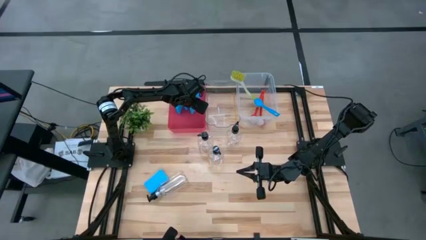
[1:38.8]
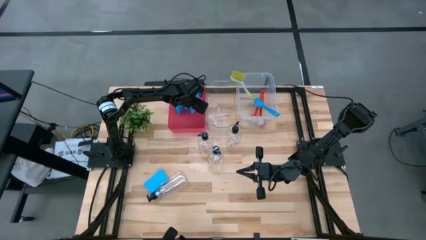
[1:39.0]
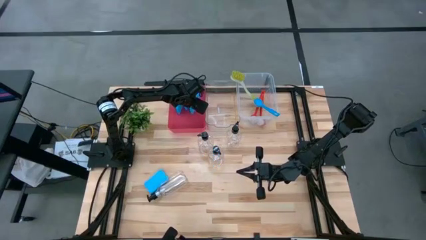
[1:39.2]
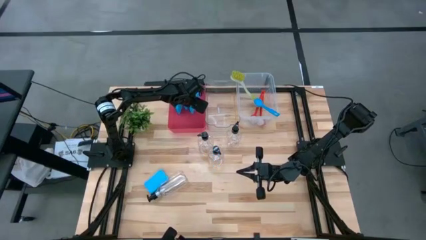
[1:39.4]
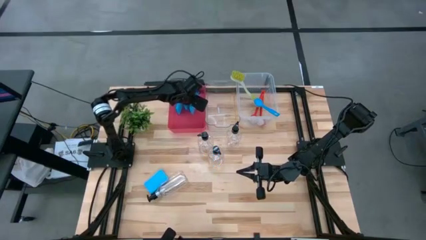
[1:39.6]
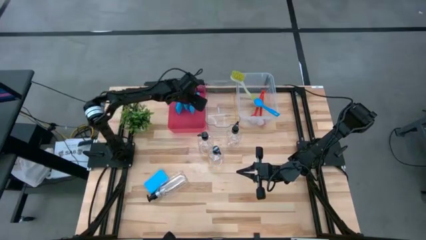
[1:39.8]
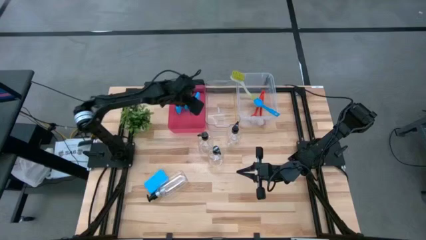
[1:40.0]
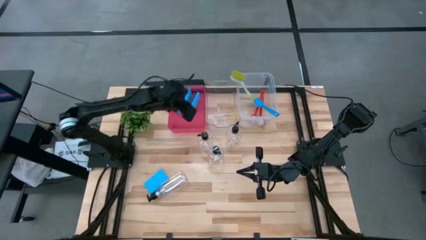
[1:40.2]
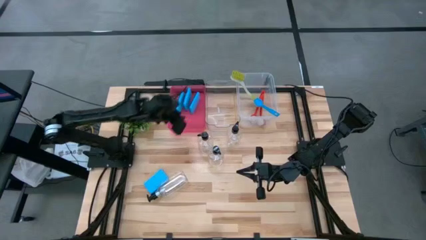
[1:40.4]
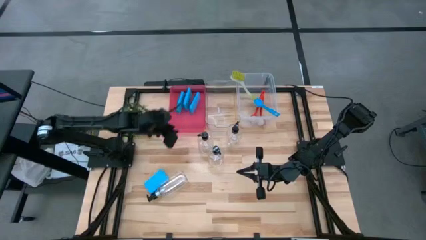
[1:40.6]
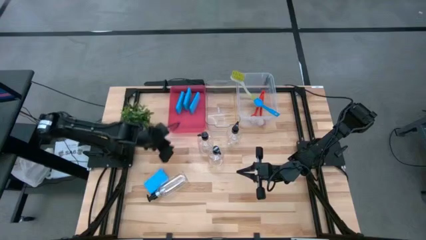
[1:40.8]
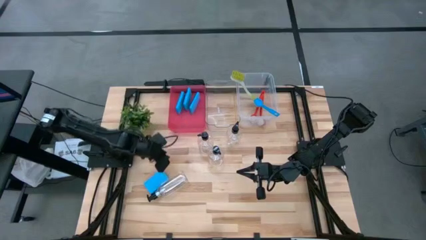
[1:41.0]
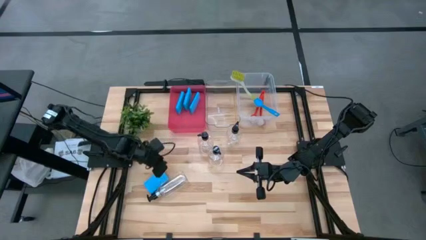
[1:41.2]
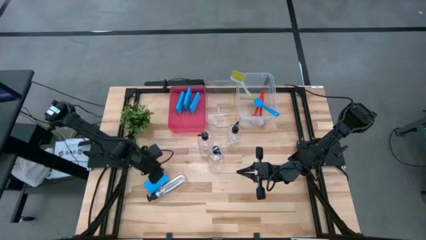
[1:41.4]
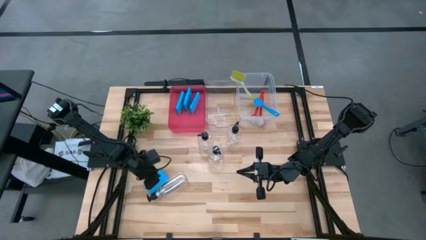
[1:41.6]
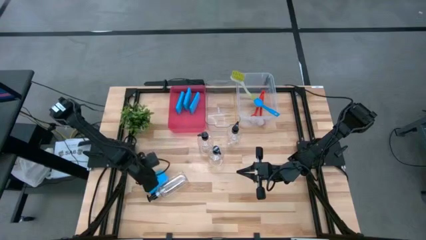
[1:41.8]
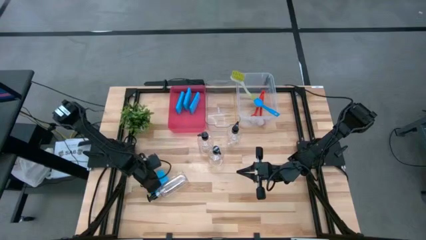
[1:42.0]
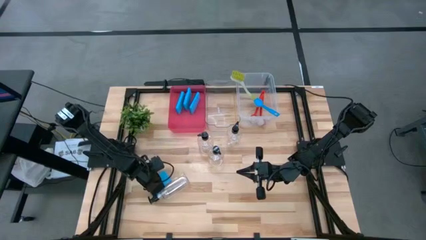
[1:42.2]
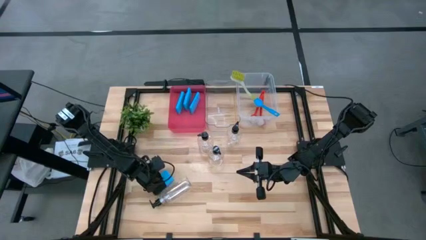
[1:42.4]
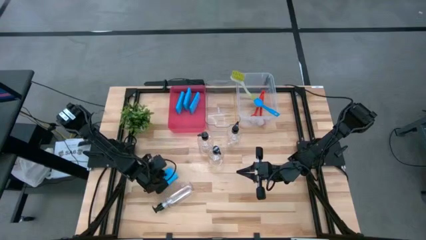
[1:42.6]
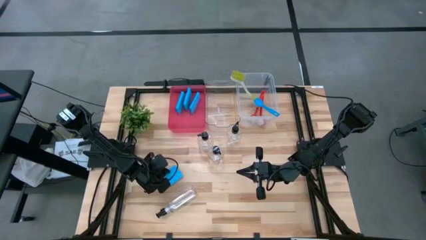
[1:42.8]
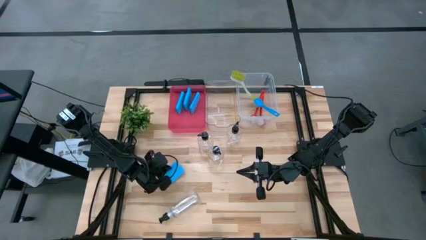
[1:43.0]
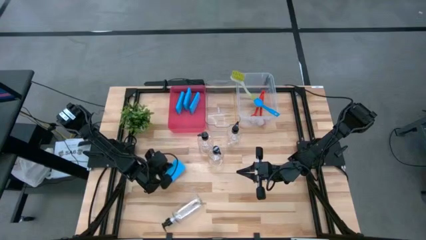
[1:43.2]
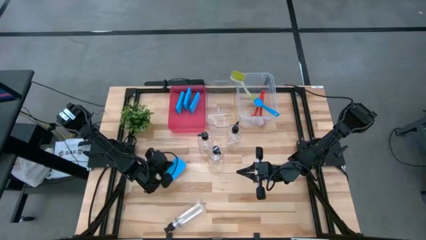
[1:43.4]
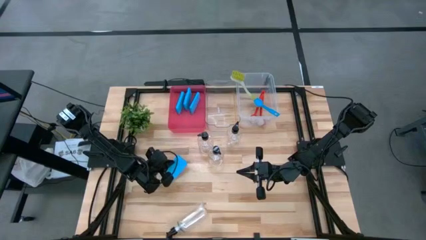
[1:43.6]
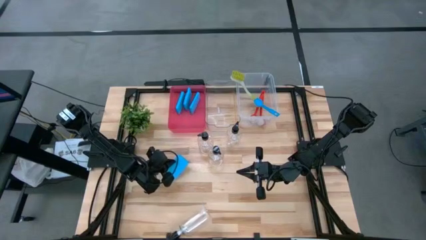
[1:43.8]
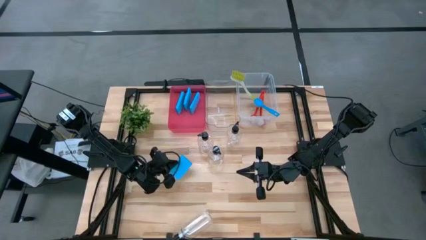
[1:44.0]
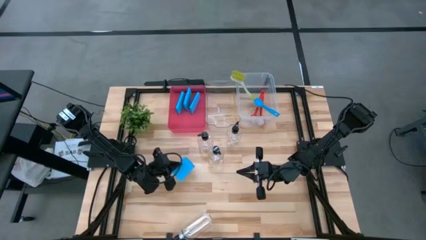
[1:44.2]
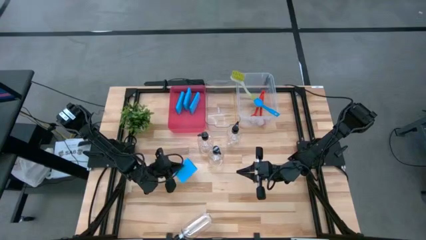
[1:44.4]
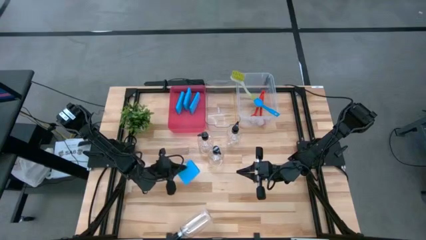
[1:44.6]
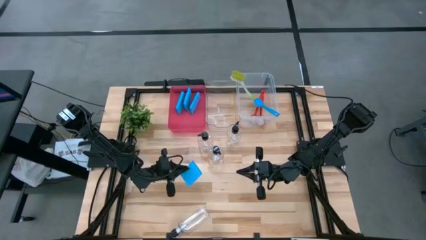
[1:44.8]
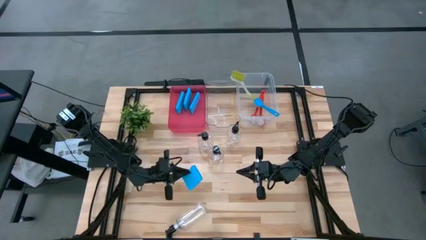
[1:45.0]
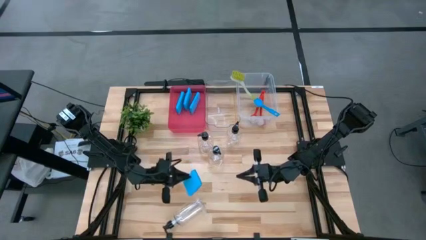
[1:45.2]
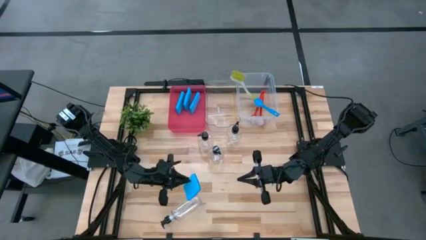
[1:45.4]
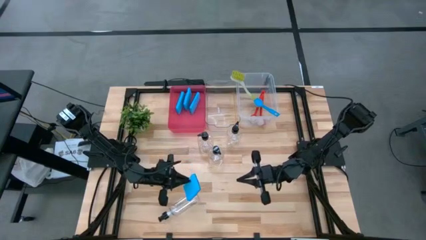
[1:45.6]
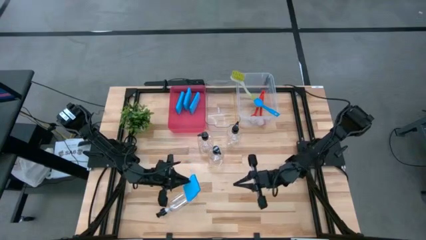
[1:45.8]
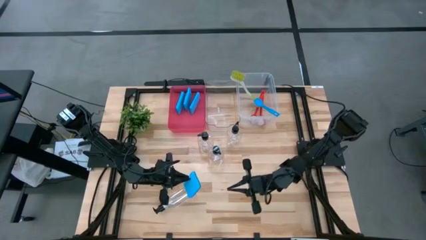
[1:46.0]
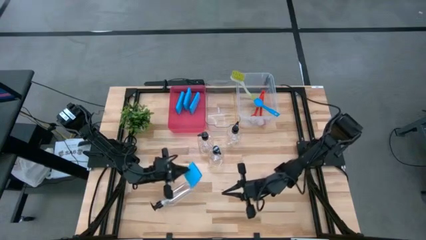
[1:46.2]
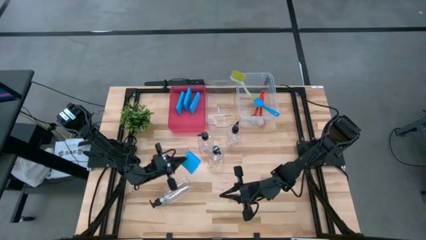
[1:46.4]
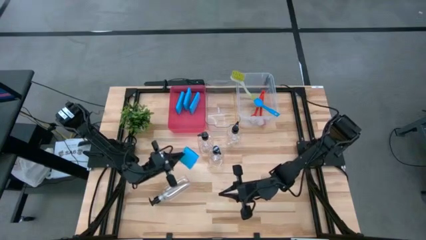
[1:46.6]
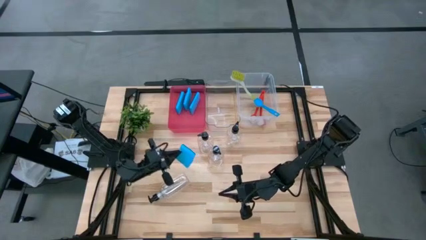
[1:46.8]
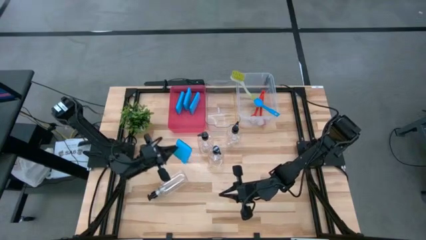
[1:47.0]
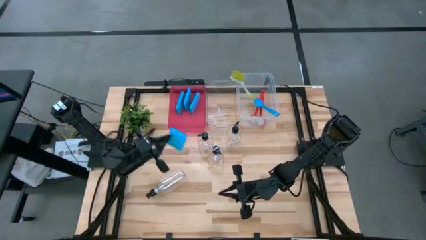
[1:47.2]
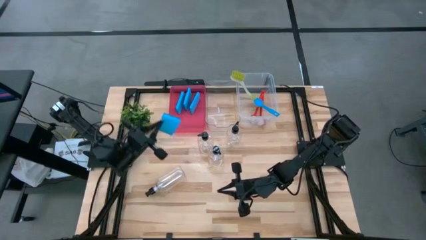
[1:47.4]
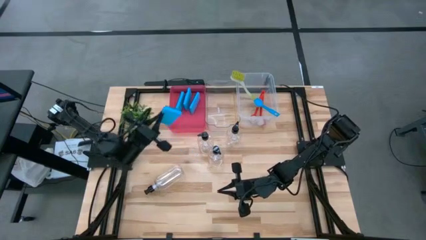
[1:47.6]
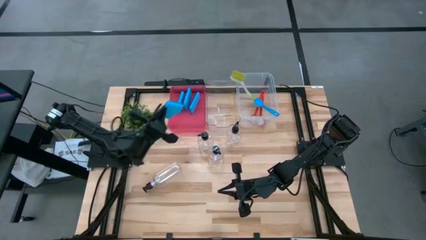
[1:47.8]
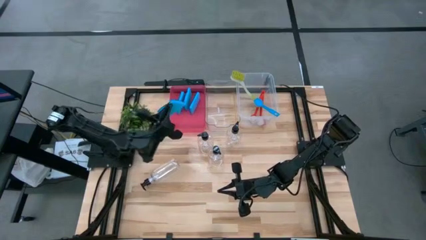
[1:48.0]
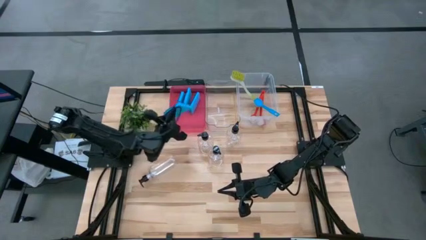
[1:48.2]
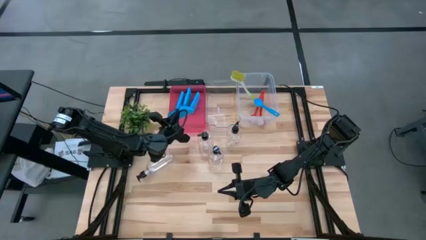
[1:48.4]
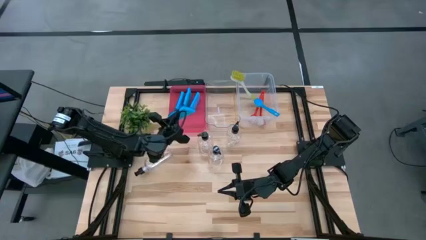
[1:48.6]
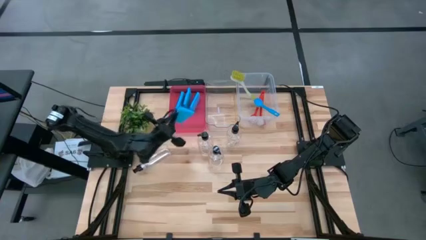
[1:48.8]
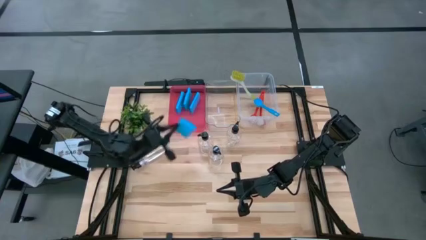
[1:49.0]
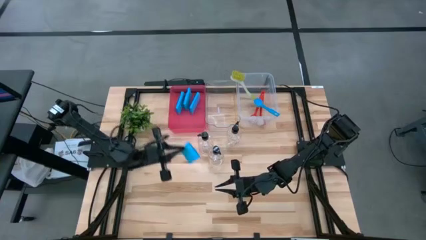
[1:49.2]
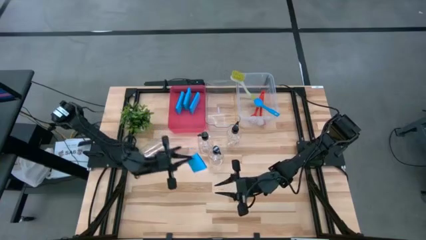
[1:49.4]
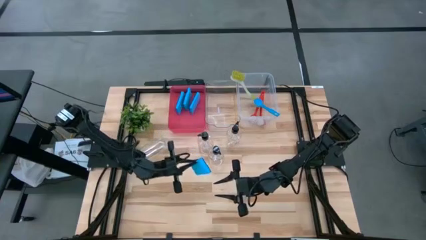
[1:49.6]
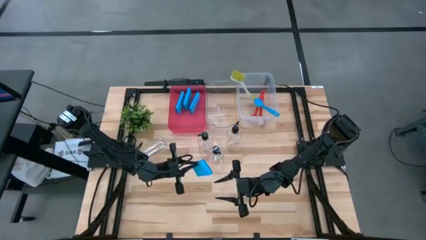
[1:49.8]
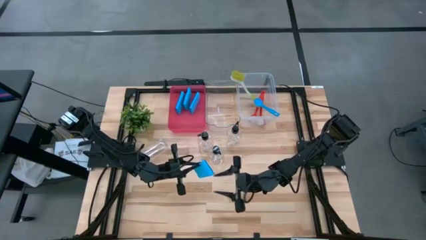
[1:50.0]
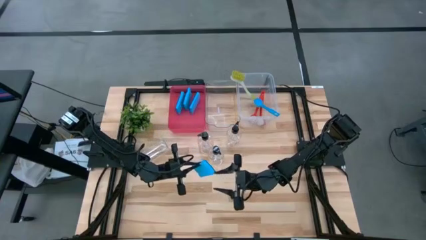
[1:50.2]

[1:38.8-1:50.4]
Task: Pick & Place Kitchen Sink Supplies
Put the blue sponge into the red bin

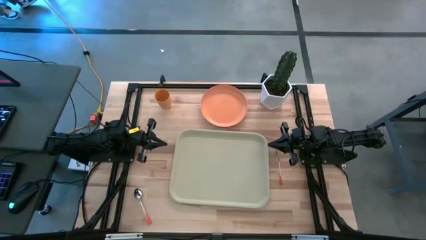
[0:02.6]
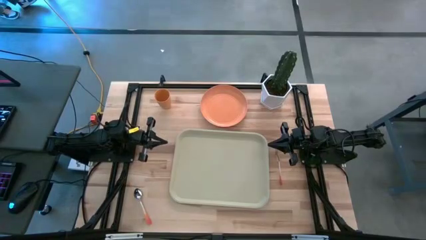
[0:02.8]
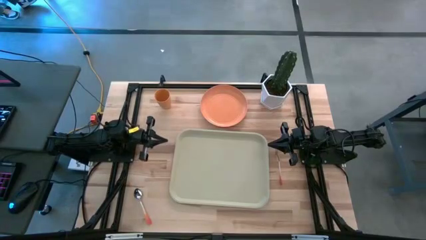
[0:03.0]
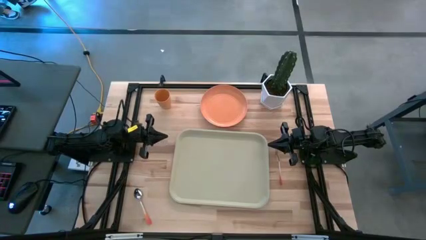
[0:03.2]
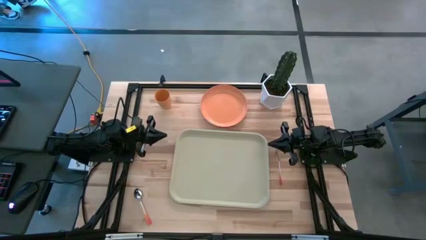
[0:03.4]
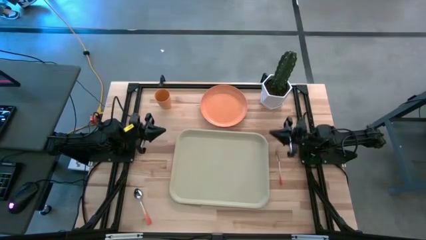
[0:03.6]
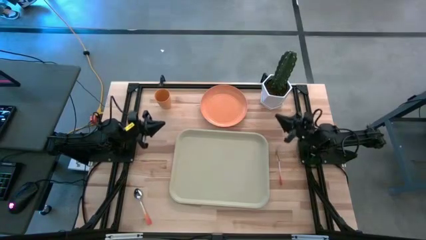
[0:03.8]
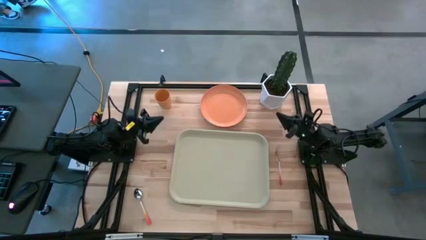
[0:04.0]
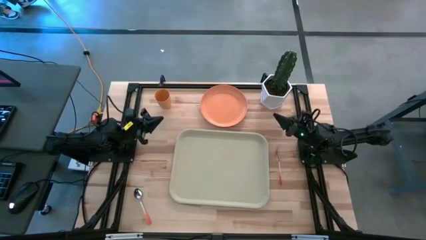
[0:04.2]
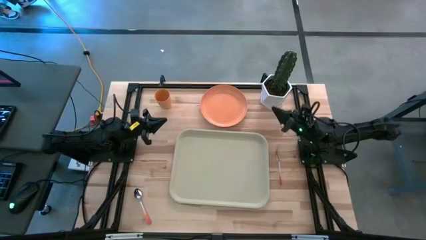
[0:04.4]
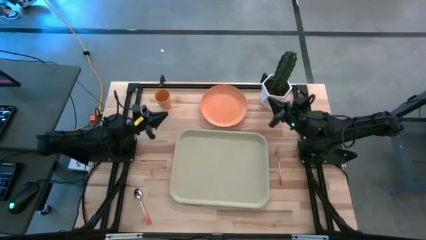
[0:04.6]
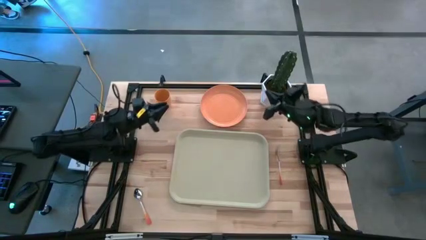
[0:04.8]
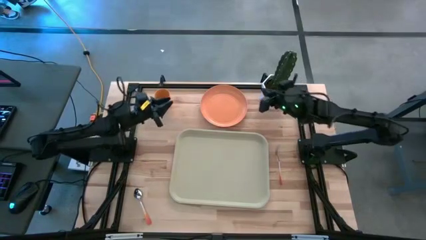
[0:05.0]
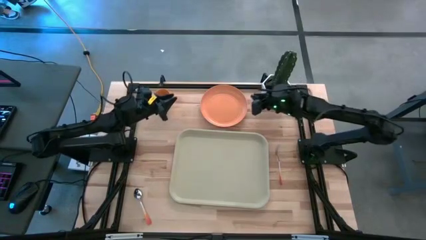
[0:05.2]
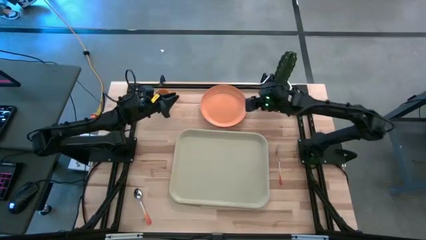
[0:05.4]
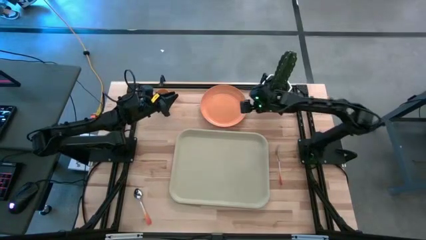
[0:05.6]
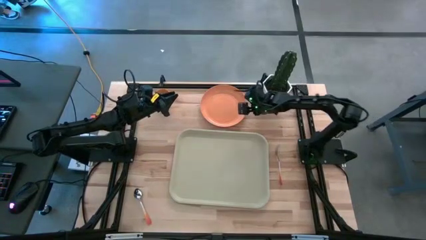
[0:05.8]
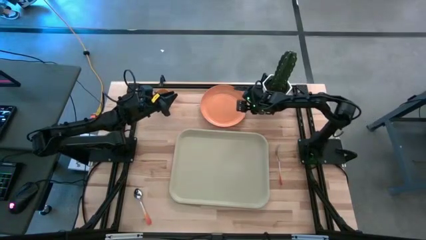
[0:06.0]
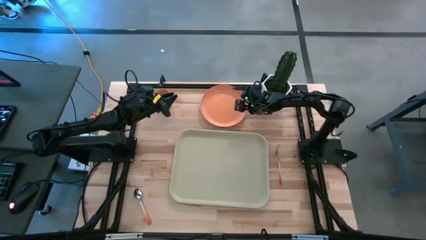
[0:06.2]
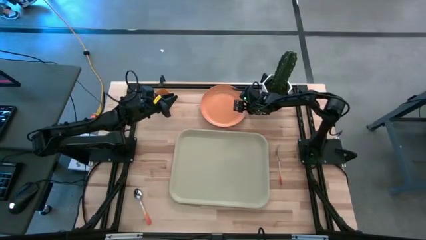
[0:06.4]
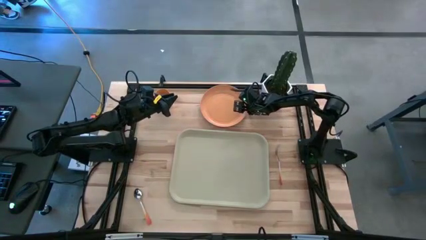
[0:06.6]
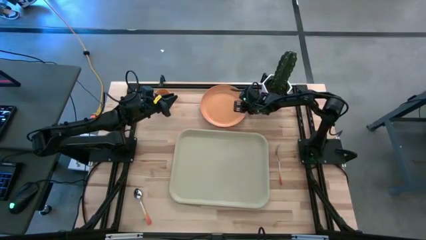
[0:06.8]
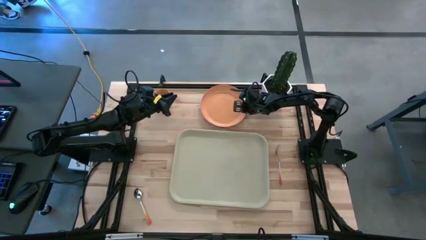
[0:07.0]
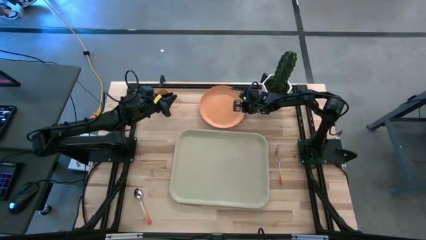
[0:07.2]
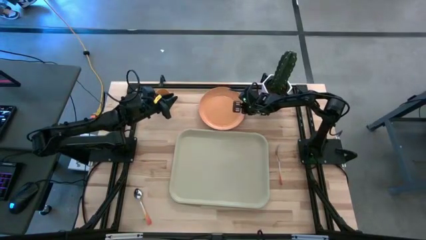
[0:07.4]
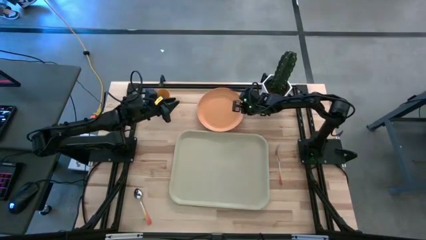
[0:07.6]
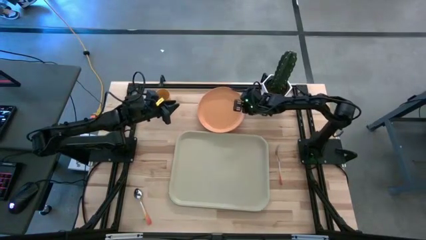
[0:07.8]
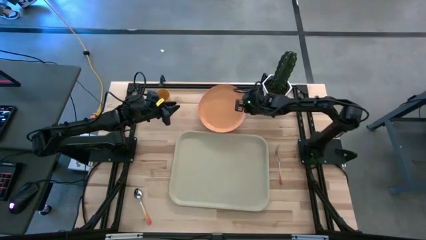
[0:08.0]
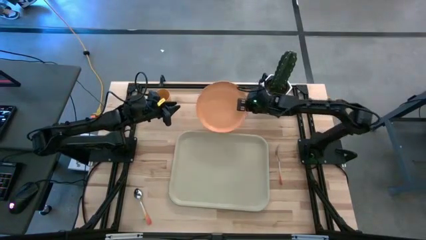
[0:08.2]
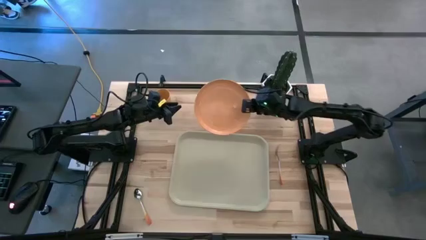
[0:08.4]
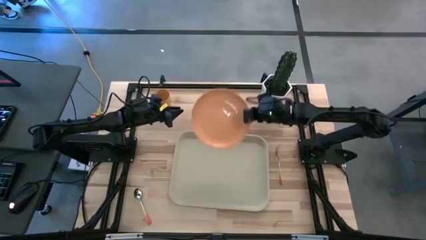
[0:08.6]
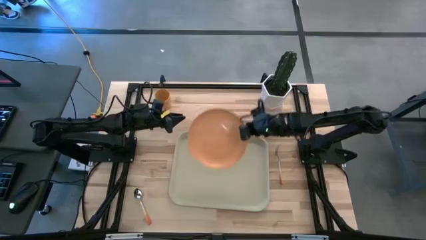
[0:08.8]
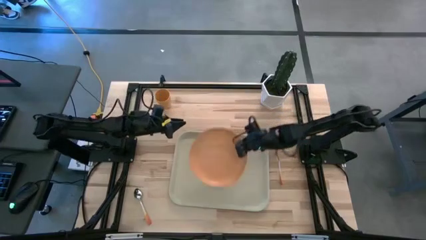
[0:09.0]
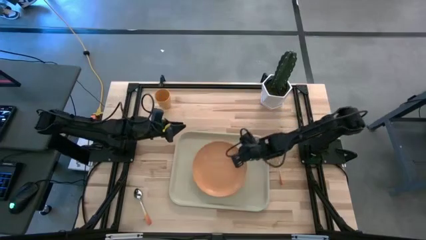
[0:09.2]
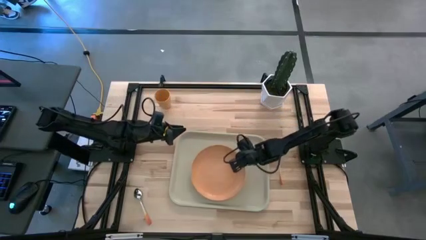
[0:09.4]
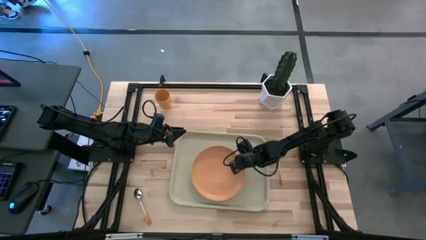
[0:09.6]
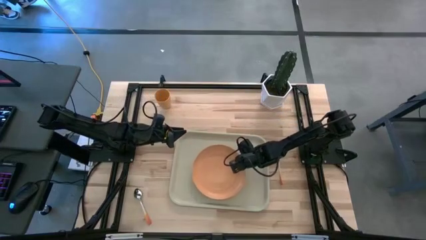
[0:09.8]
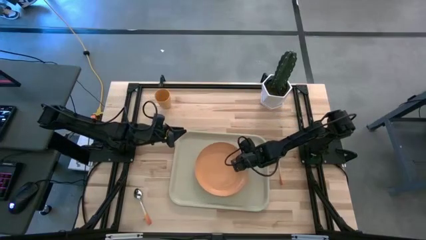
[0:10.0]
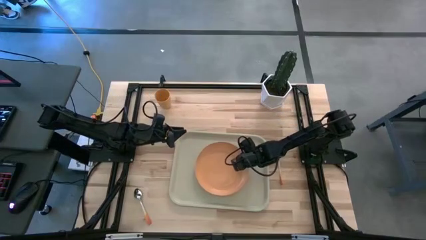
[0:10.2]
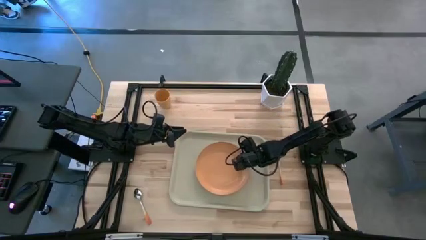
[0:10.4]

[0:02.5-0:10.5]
Task: Pick and place plate/cup/fork/spoon on tray
Put the orange plate on the light brown serving tray
